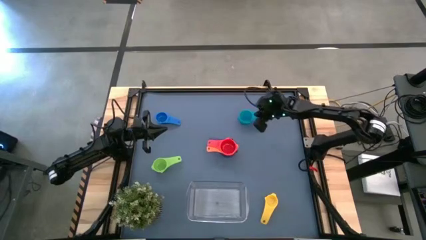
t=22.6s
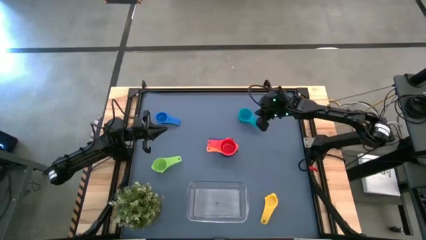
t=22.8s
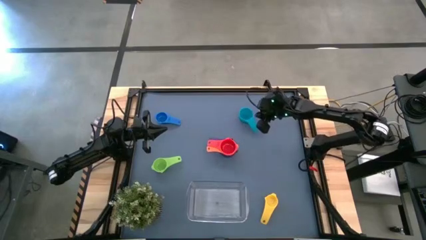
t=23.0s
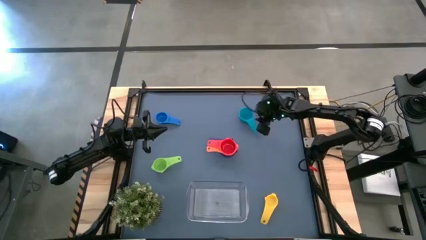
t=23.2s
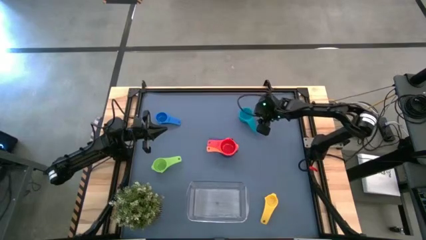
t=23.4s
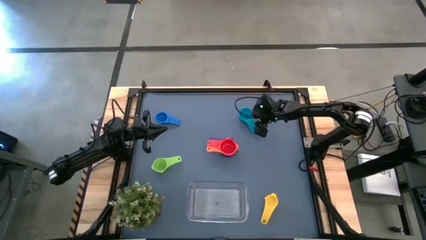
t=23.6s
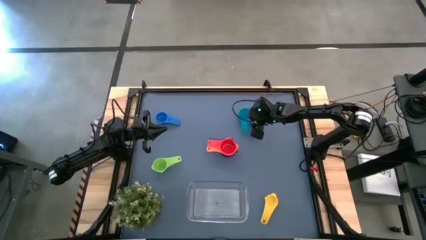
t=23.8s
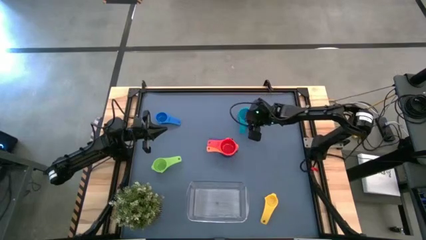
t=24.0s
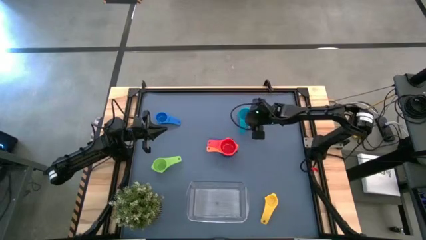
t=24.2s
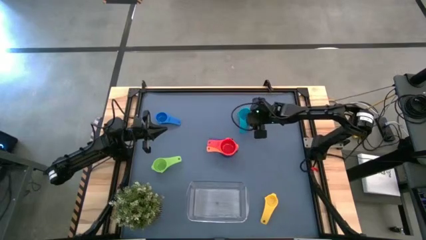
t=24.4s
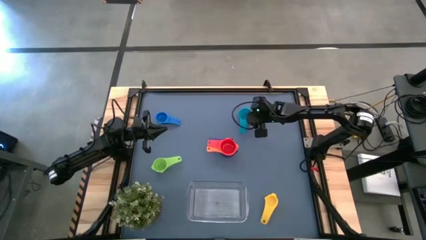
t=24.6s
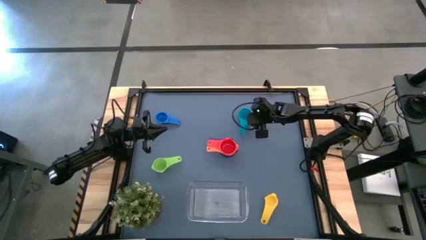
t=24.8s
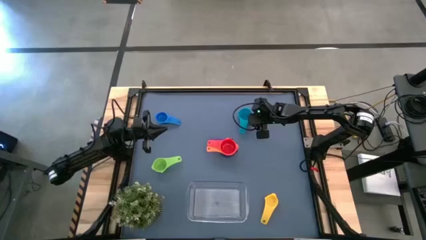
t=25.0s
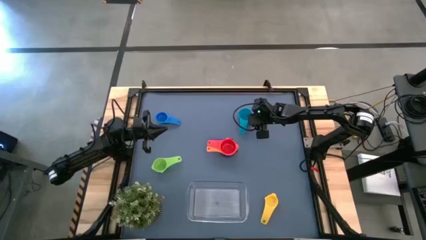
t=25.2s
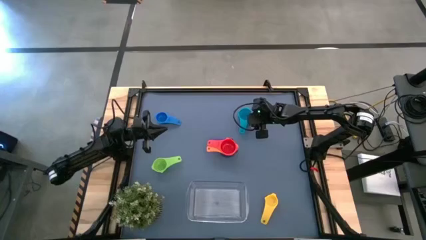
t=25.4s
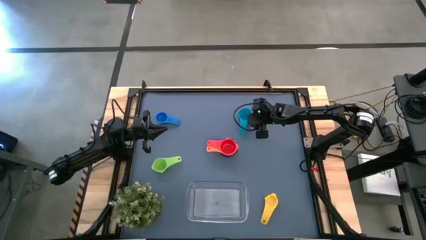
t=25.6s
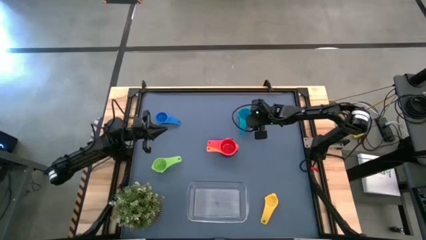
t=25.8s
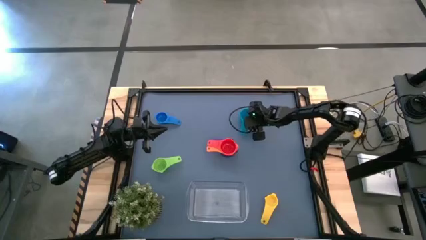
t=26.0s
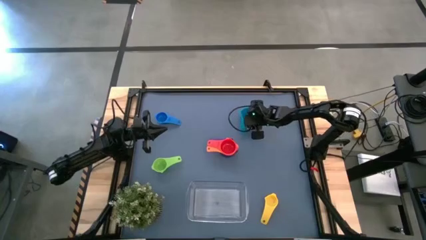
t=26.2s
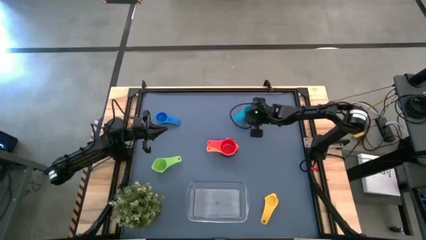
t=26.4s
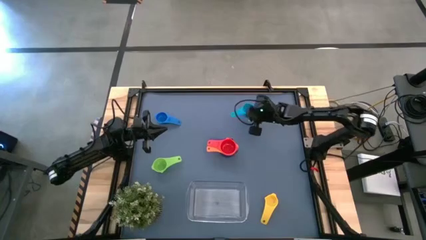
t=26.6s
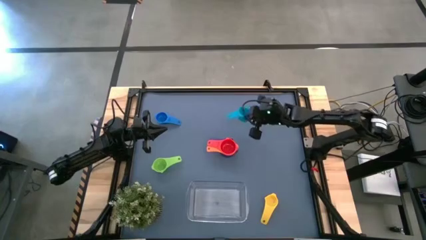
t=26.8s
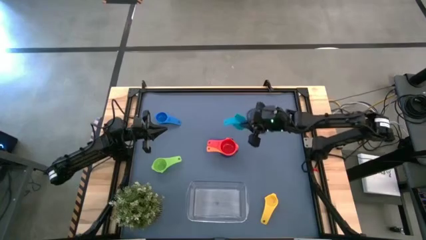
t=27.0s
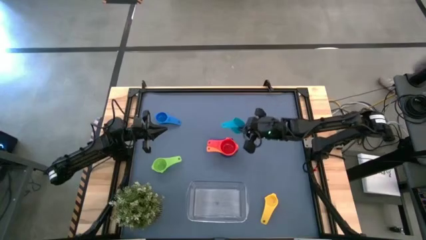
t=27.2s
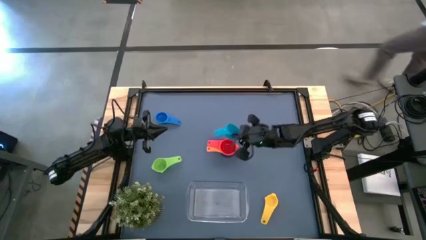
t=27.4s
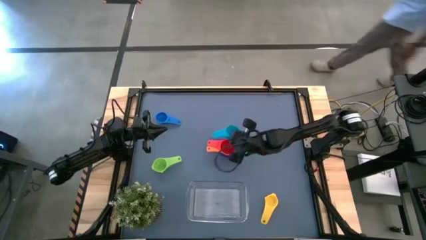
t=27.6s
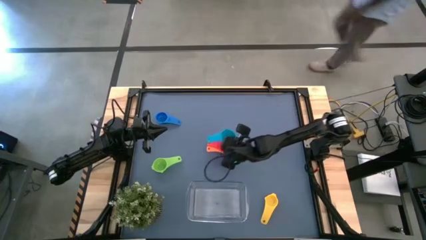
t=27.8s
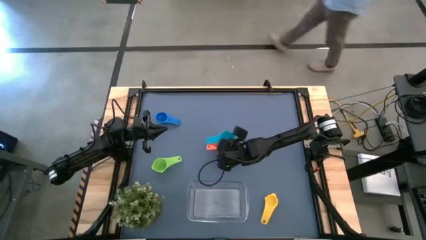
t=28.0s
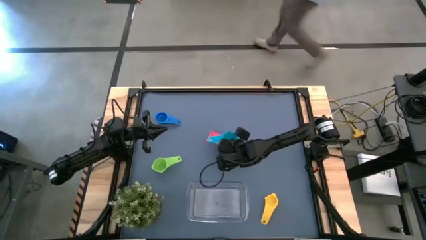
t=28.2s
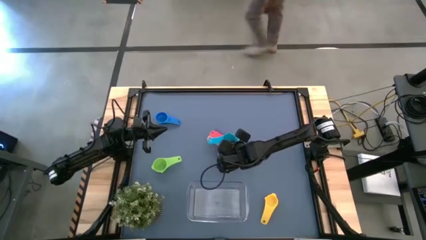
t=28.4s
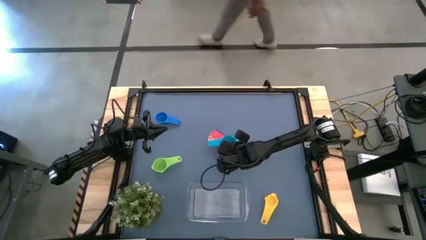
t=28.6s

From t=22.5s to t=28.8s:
Task: Nest measuring cups in basket
Stack the light blue measuring cup on top of the red measuring cup

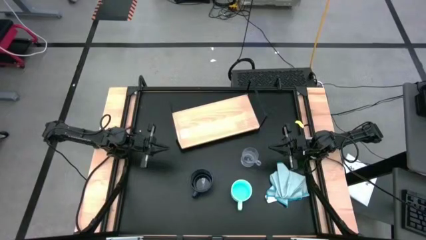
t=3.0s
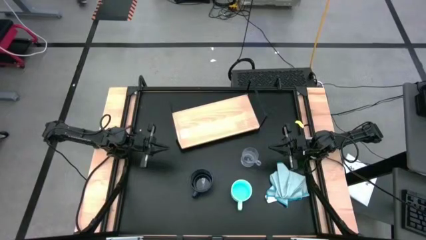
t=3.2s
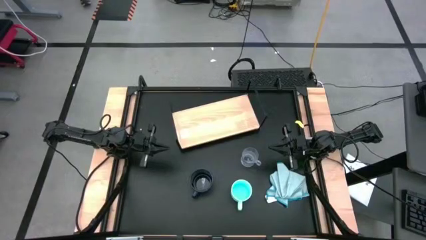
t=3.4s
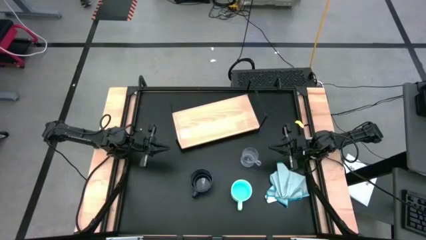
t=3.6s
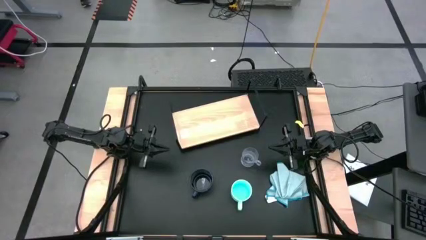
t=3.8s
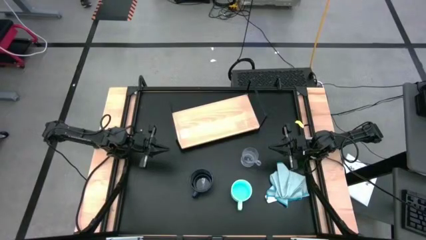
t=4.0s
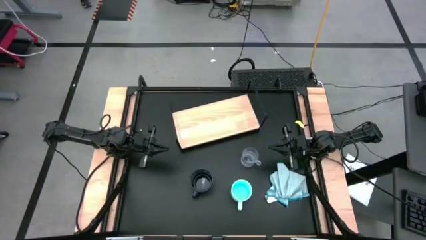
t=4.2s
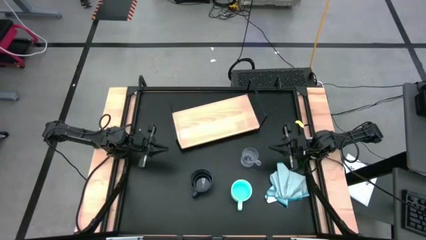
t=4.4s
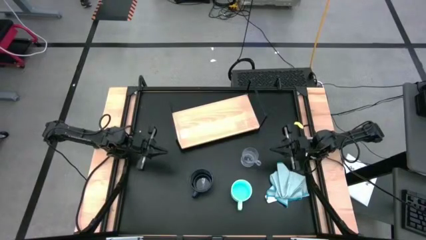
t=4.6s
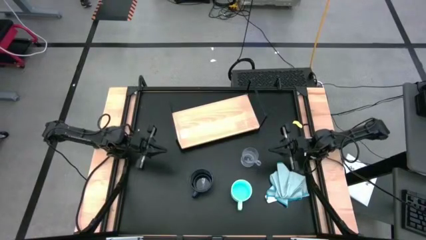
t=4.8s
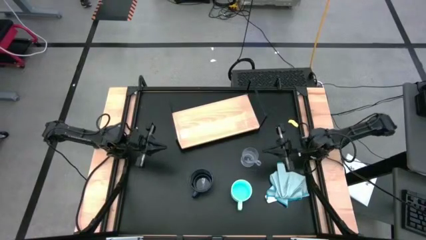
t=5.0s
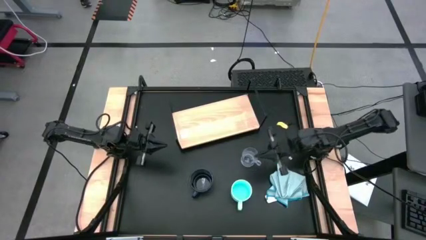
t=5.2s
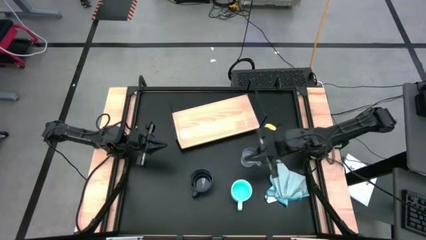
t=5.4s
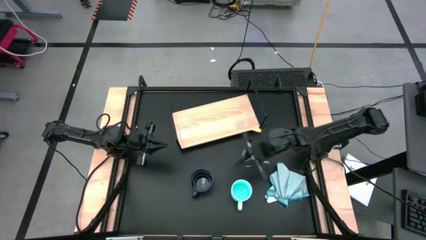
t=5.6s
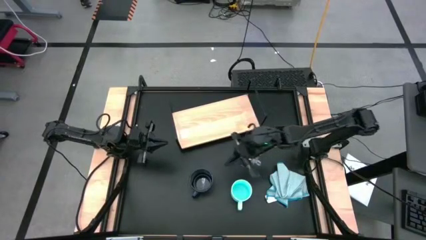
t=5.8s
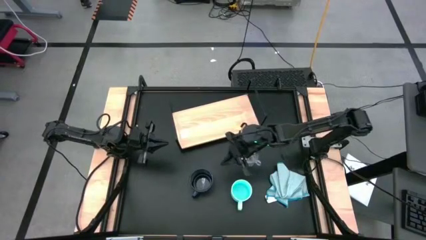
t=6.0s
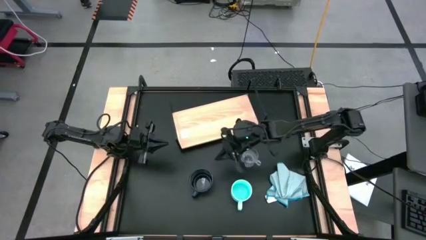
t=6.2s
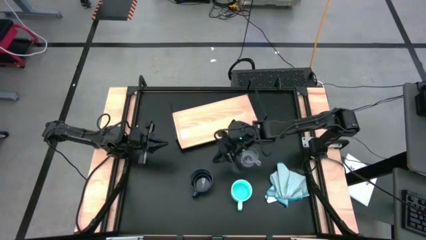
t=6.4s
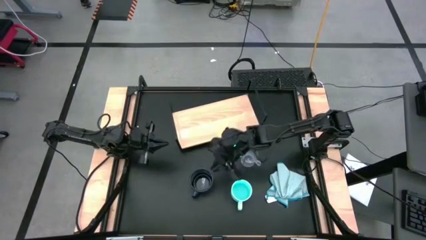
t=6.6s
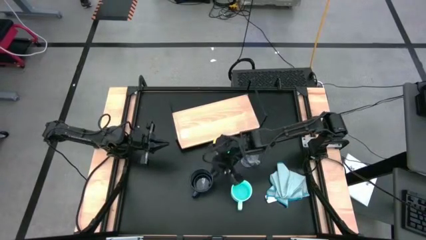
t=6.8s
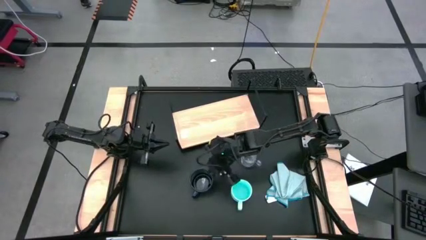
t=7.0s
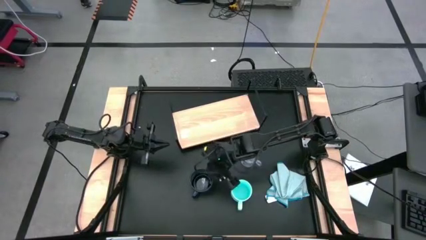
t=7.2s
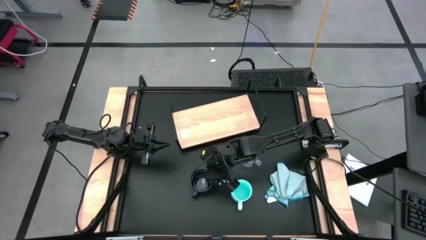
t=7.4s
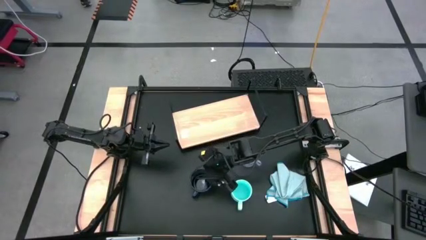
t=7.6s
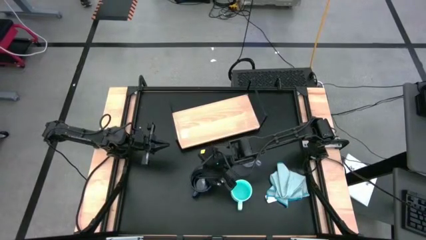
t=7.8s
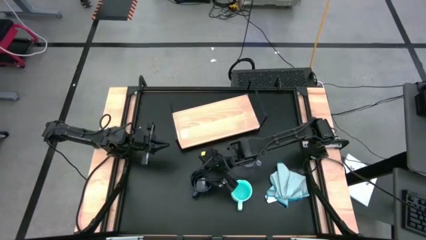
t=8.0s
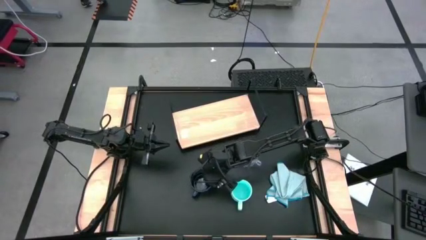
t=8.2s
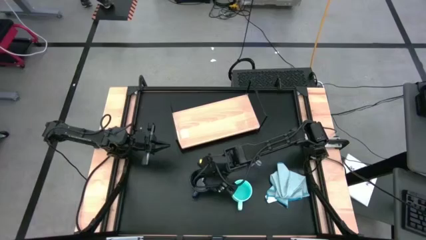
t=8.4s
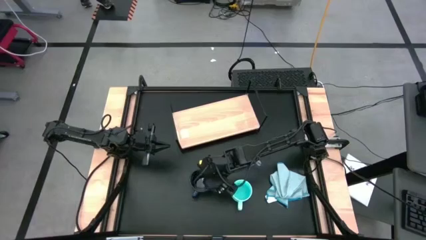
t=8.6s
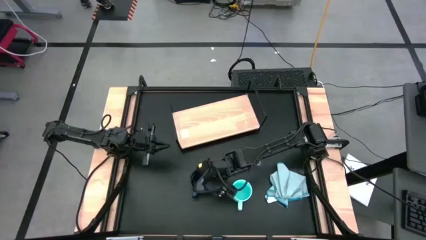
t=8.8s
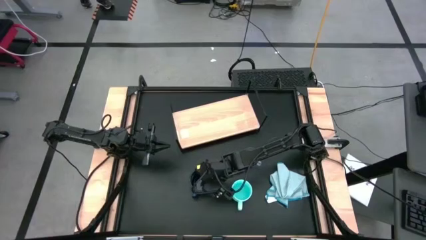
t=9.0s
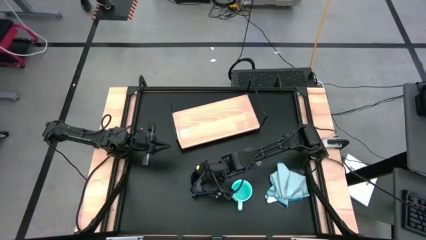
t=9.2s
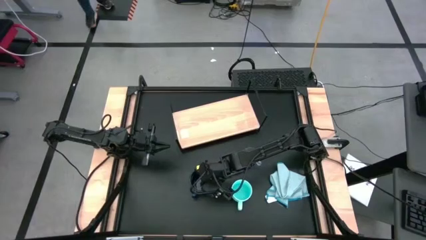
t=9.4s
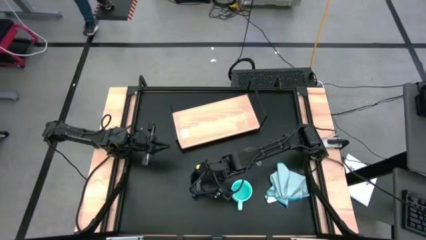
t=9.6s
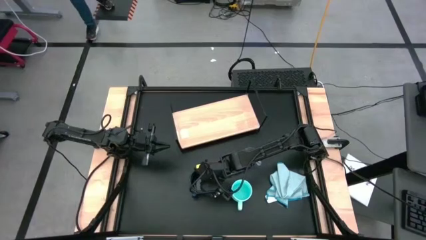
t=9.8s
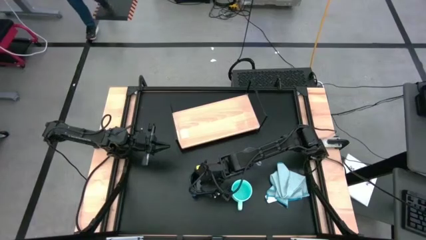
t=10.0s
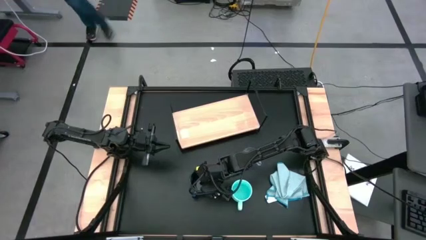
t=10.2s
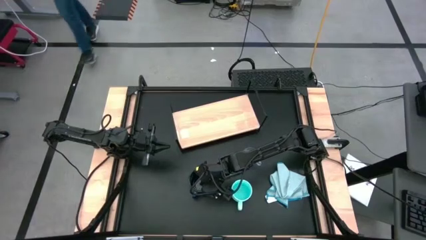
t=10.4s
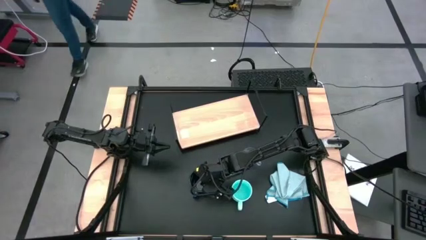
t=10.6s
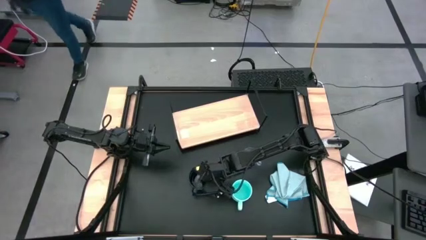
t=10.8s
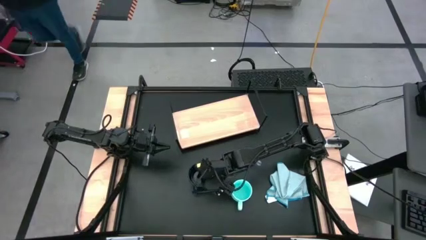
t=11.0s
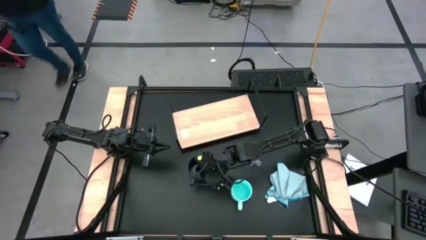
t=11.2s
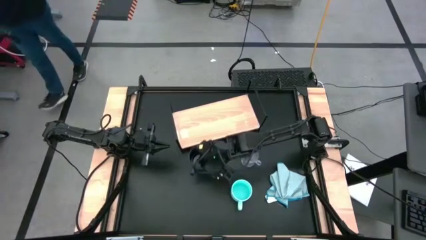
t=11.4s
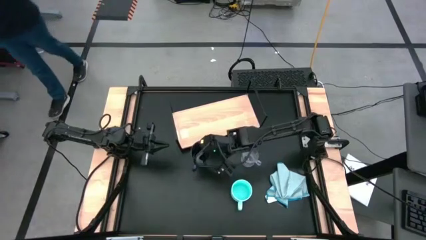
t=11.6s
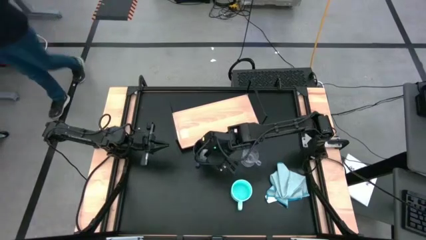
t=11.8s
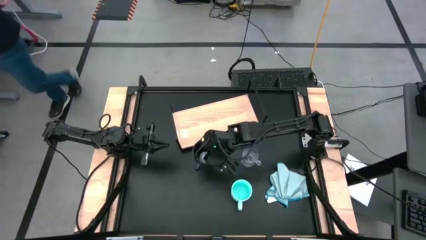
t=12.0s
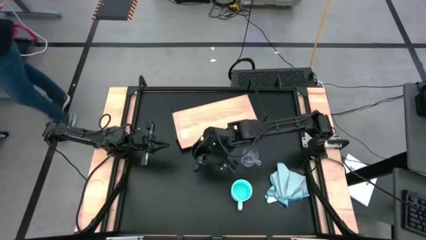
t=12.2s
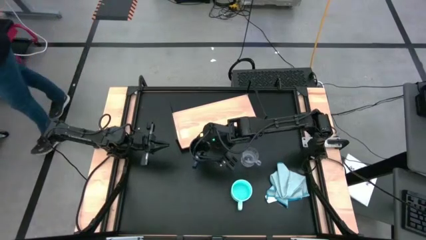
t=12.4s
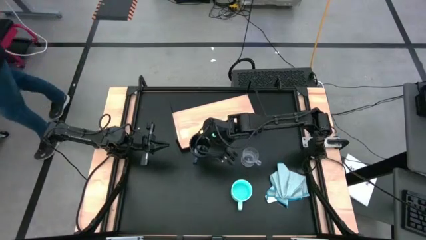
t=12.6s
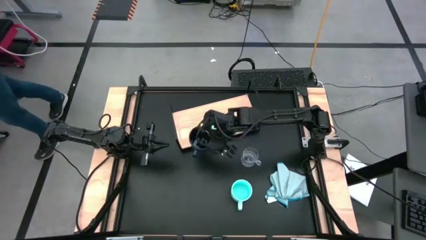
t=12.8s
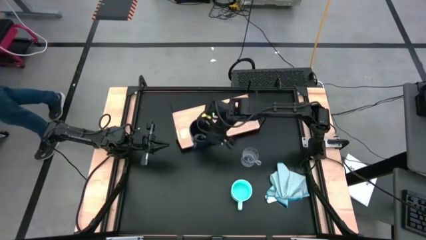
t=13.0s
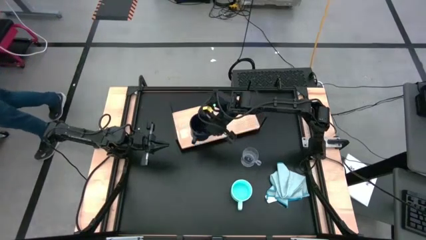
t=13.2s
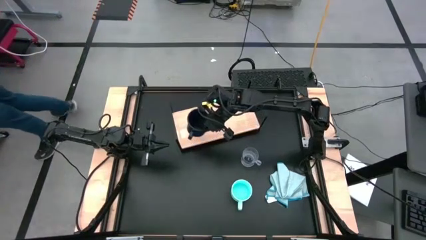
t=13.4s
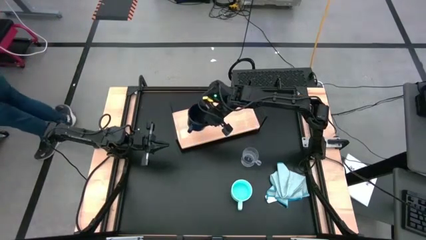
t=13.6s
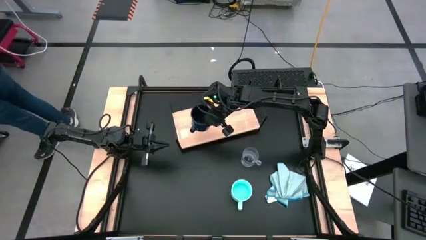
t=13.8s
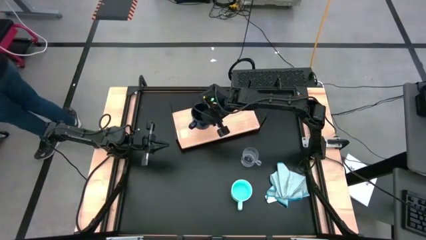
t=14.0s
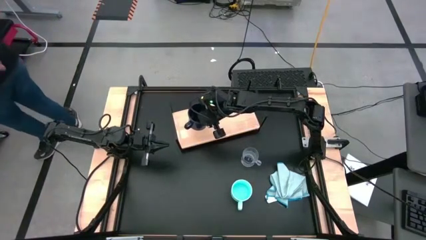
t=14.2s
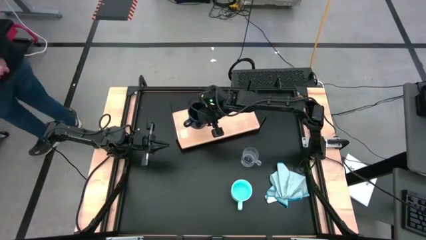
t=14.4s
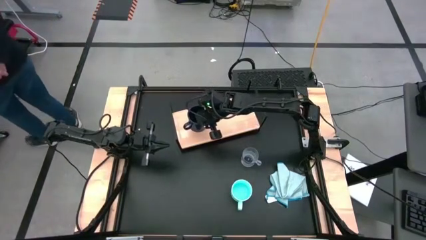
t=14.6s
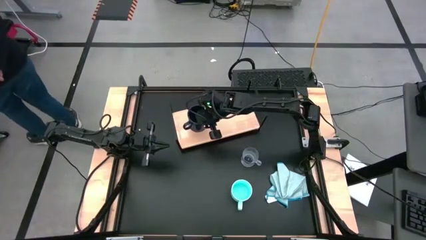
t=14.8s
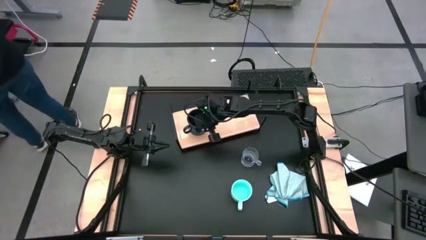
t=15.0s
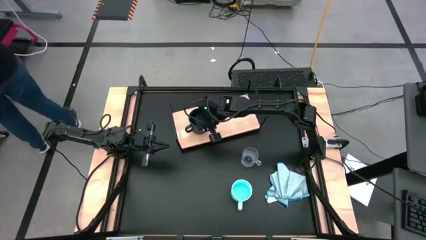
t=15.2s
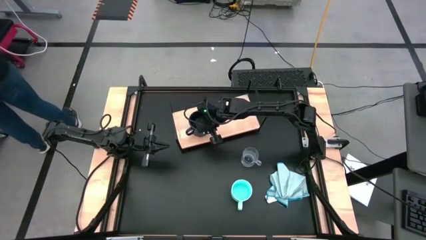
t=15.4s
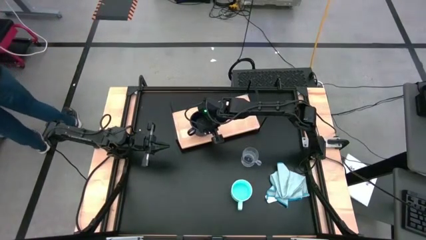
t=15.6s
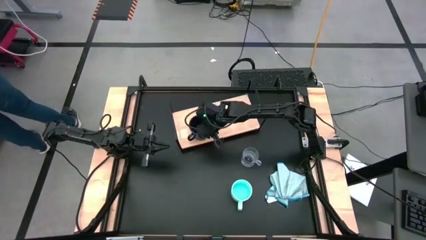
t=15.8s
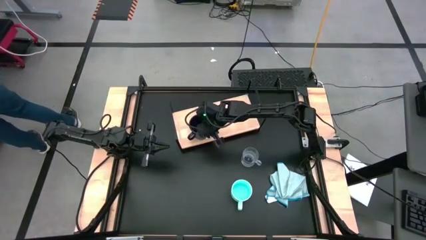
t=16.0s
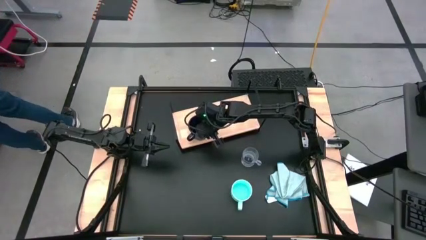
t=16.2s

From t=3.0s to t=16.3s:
Task: Stack small to large cups/mugs on shelf
Put the dark blue cup on the shelf
